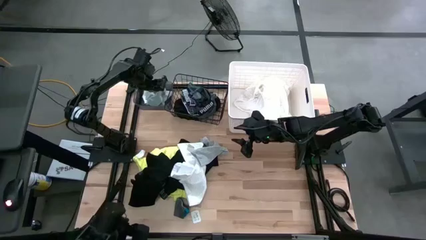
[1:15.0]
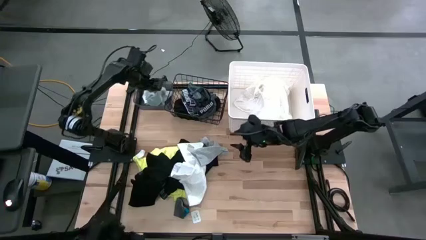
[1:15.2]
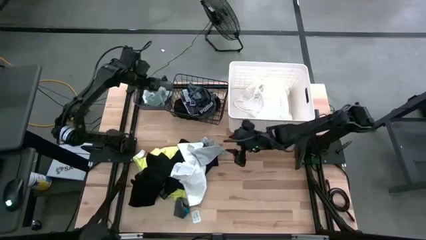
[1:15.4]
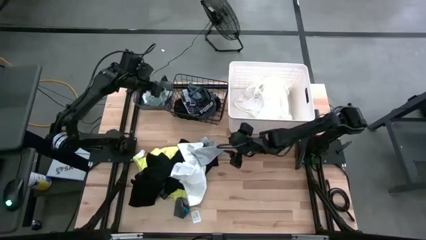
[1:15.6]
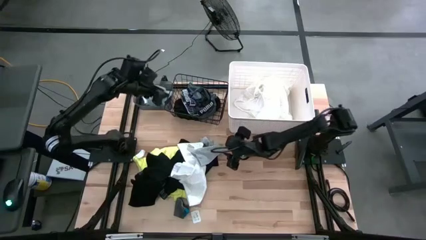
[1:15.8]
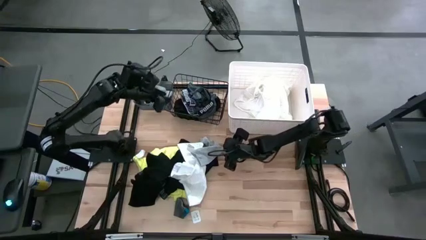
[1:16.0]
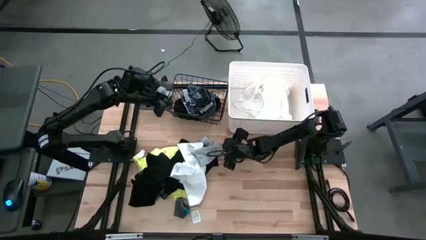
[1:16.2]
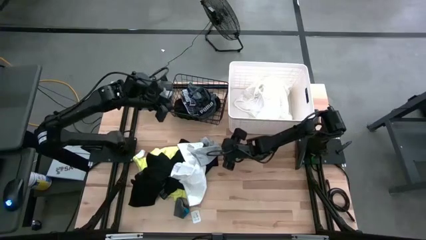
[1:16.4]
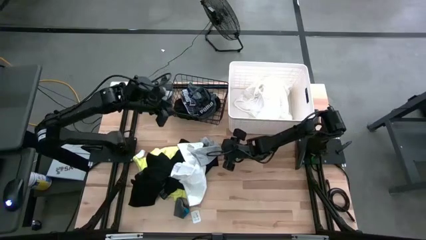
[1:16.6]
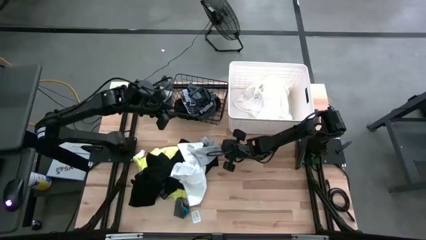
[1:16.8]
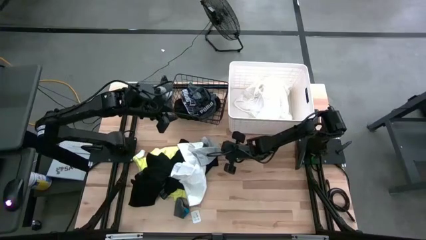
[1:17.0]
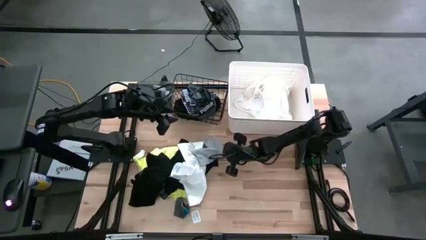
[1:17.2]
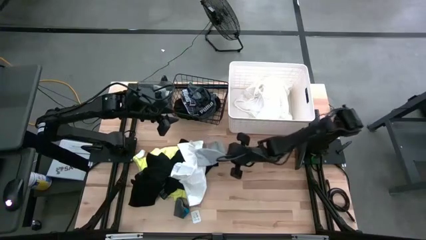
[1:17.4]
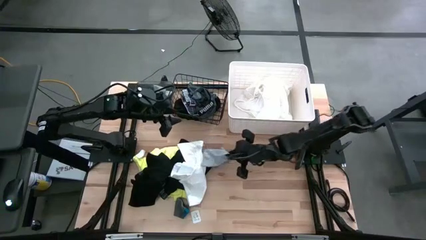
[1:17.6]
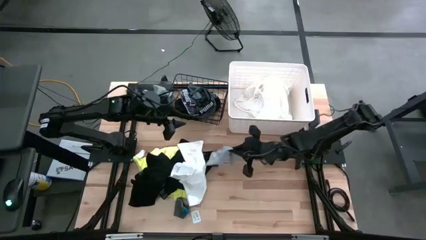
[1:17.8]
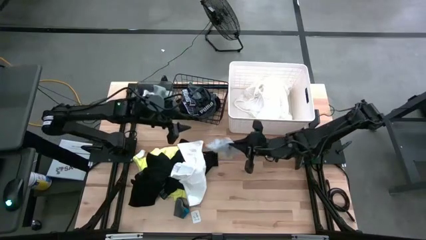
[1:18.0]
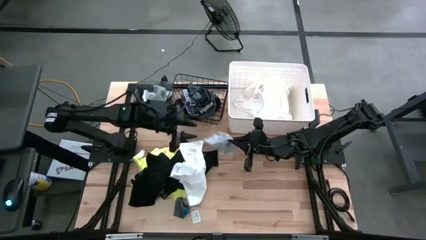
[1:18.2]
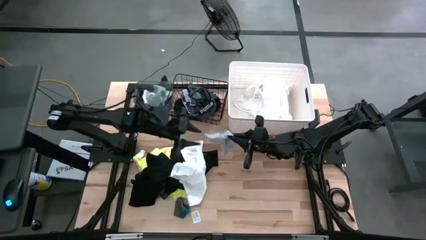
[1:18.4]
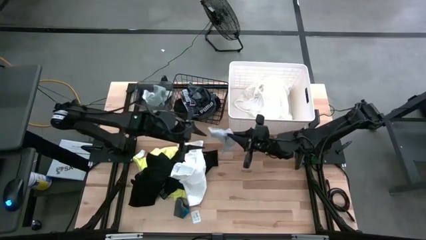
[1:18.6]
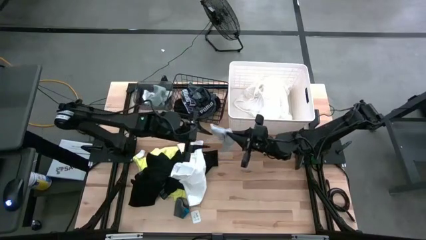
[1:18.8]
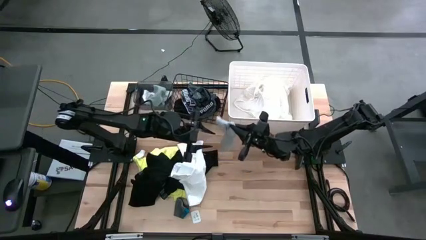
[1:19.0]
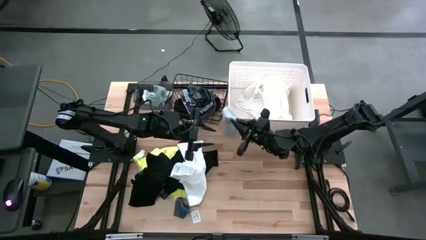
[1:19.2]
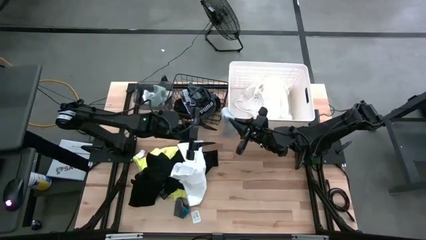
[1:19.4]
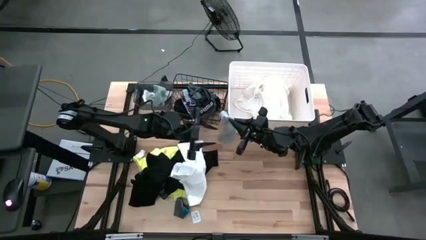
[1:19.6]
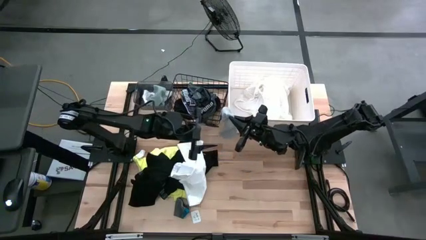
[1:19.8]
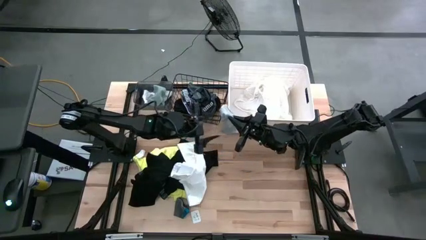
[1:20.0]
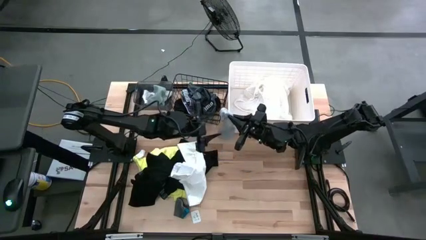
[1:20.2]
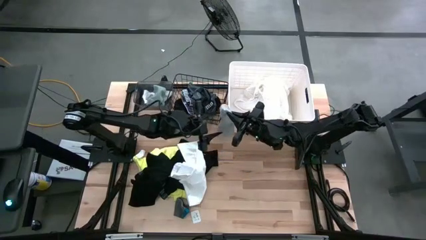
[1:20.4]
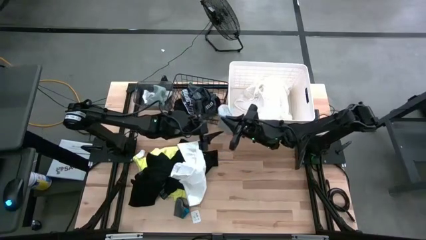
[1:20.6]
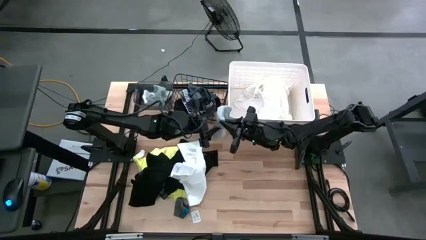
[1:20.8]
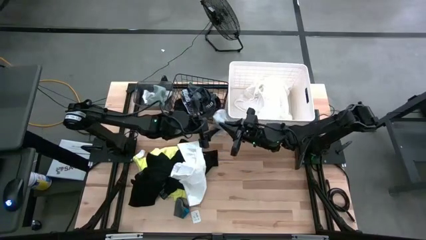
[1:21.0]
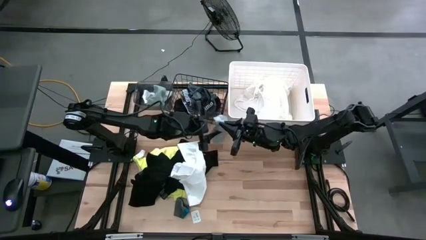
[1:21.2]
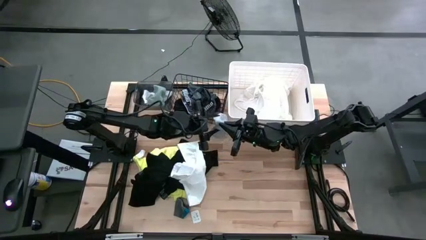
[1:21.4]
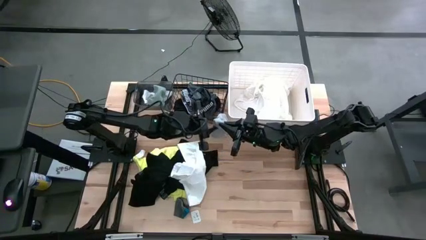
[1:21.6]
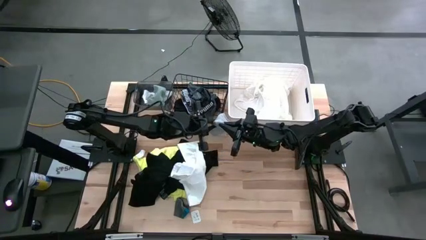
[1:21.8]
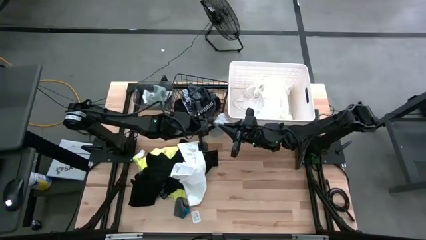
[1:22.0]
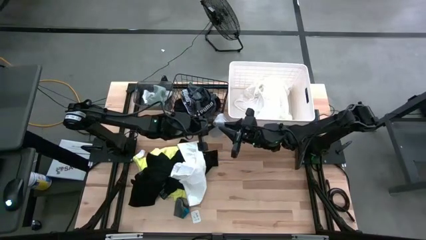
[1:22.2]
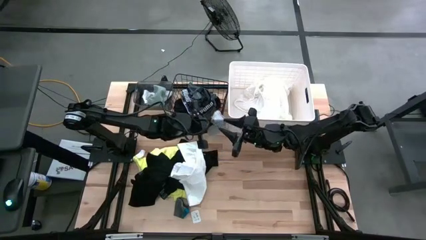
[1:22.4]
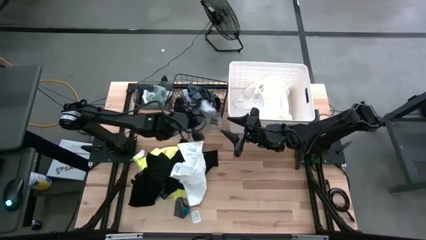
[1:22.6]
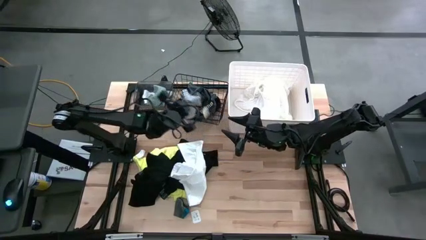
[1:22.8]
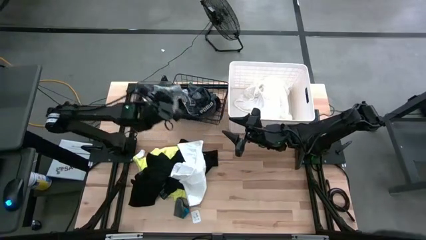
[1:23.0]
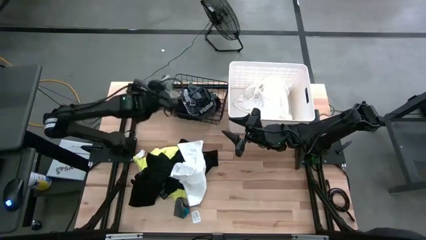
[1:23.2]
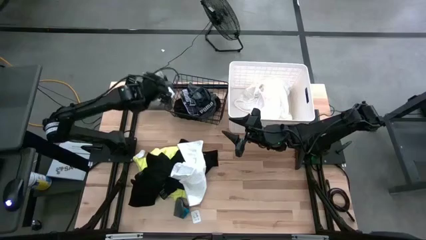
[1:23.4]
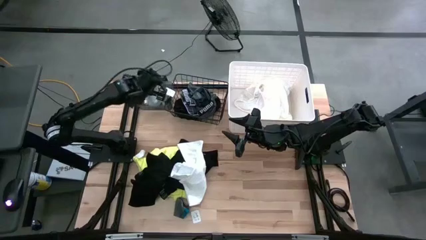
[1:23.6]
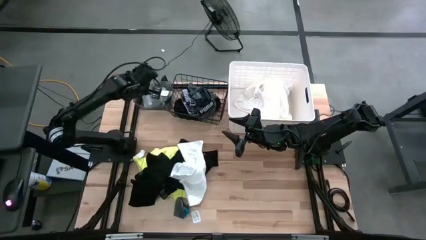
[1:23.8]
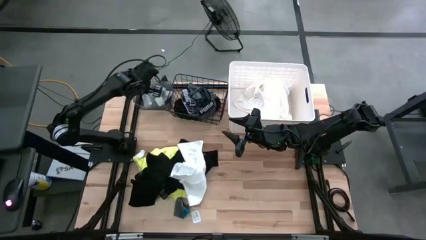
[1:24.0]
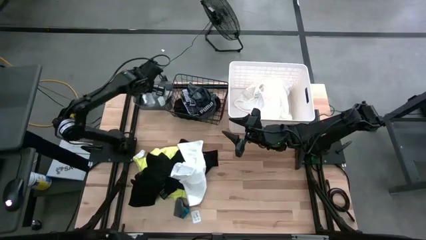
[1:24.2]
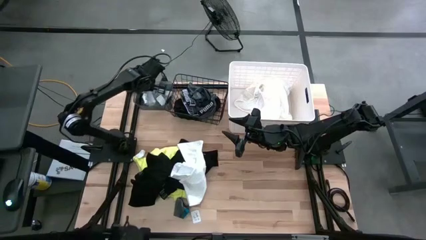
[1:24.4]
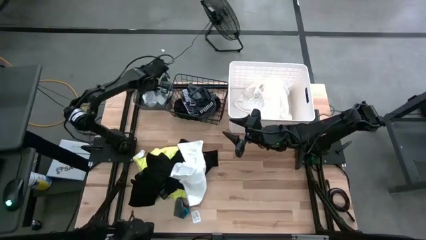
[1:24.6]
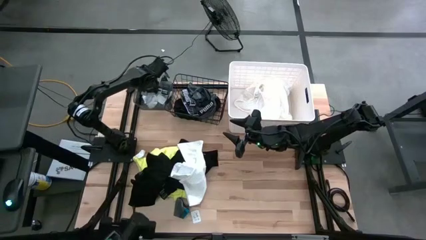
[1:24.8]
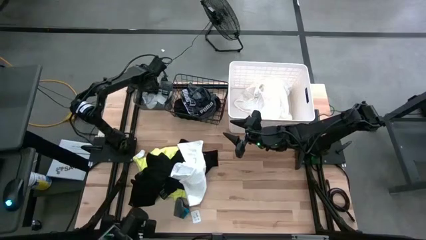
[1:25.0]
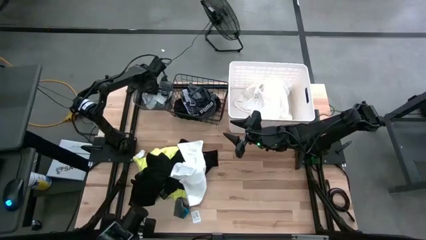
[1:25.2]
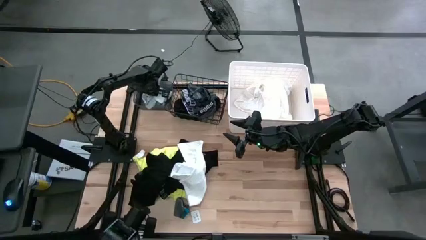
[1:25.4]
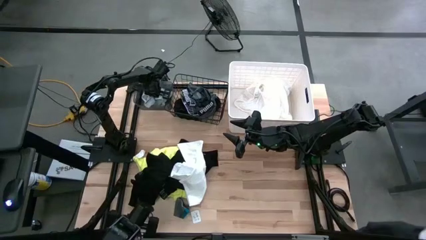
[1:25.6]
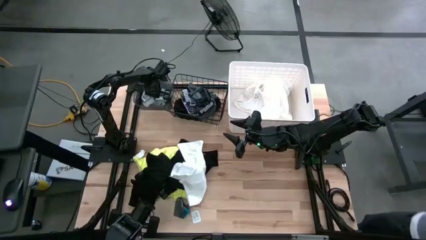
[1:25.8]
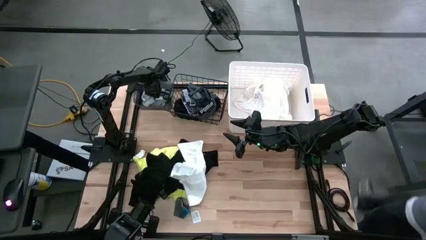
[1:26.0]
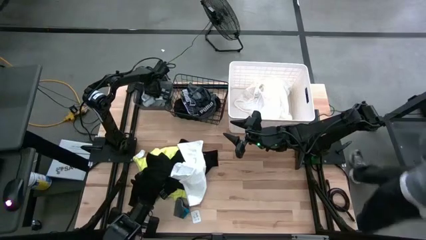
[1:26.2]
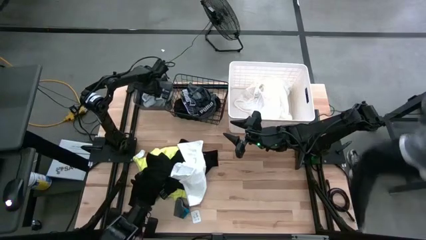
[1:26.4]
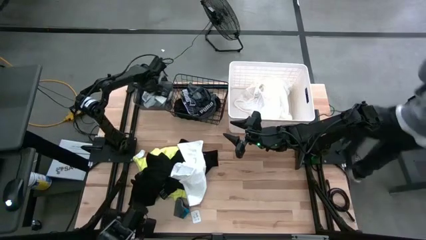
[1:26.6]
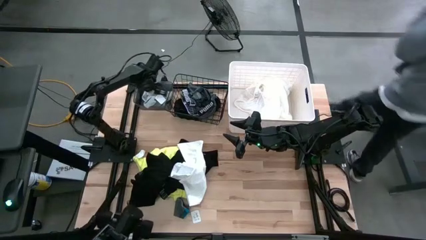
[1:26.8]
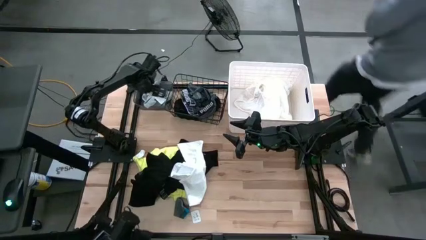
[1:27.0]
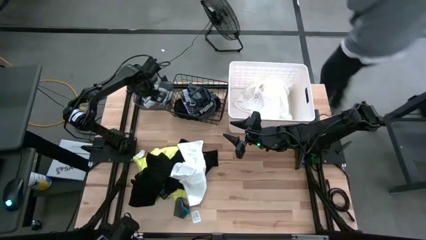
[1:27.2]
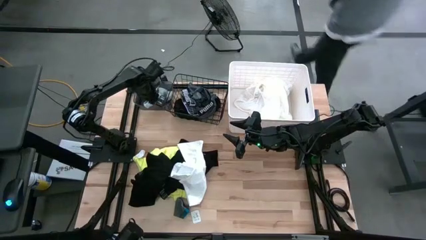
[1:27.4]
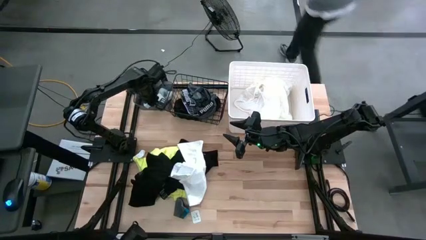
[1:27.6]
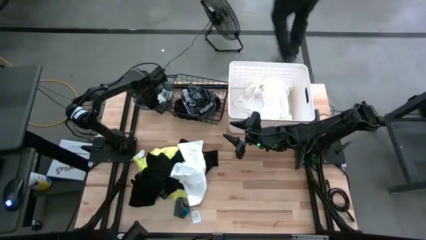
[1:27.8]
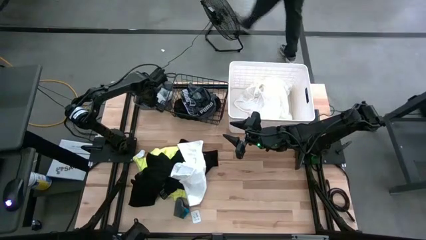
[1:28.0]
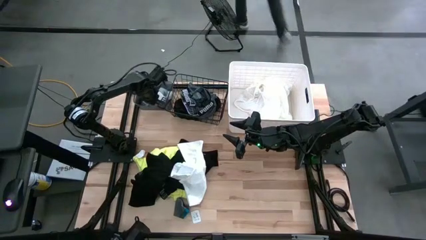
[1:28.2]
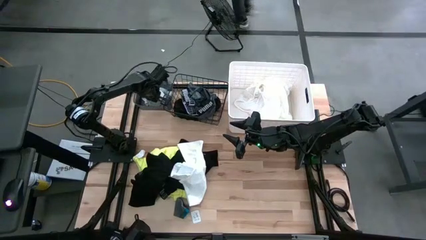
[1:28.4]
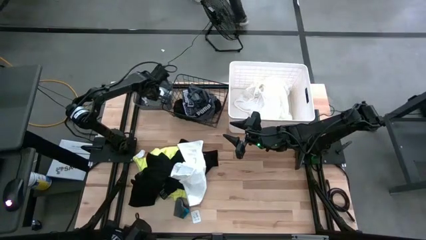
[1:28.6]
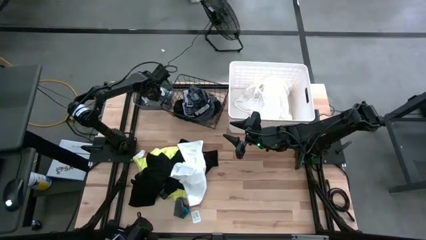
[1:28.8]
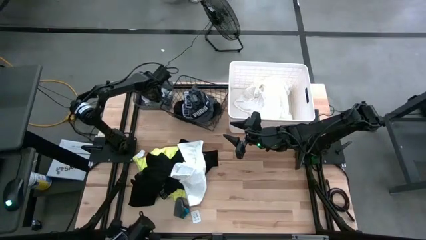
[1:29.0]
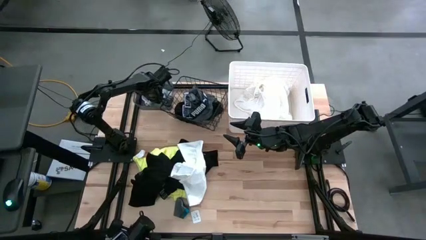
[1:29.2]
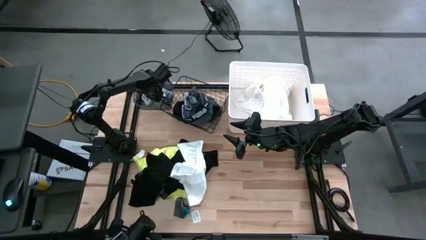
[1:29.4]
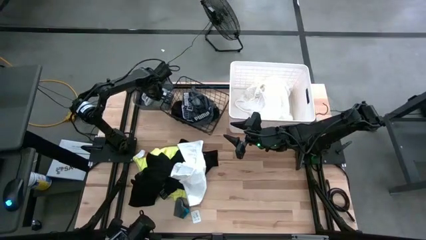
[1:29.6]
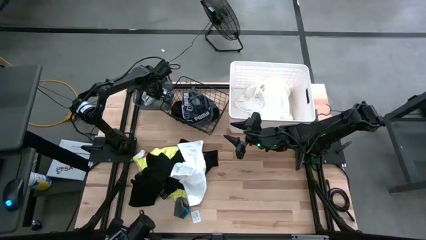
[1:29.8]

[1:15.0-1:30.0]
Task: Pick & Place Cloths
Put the gray sock into the black bin

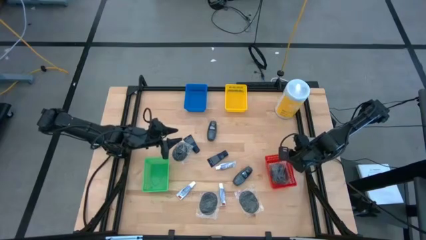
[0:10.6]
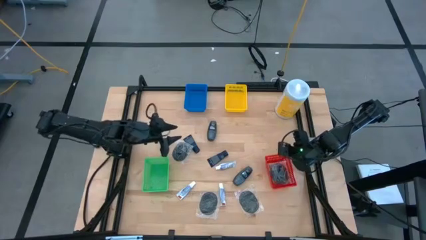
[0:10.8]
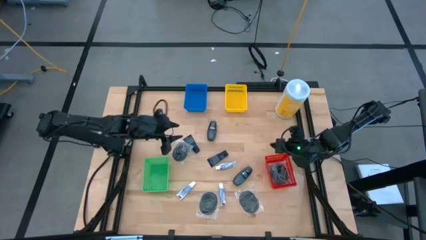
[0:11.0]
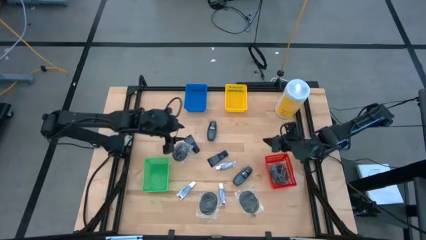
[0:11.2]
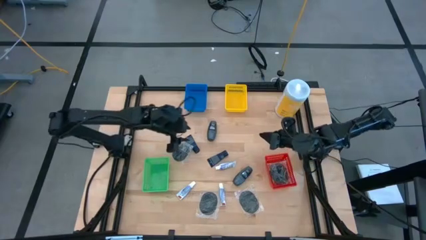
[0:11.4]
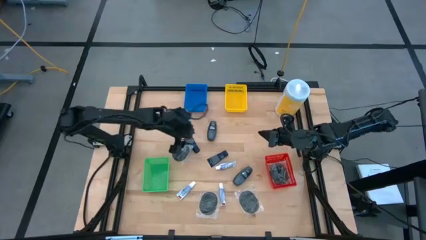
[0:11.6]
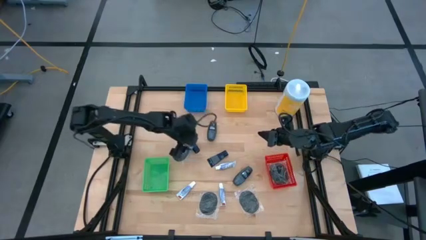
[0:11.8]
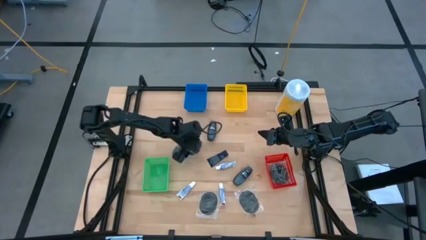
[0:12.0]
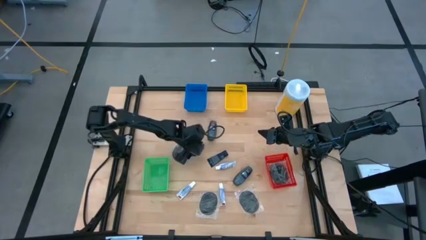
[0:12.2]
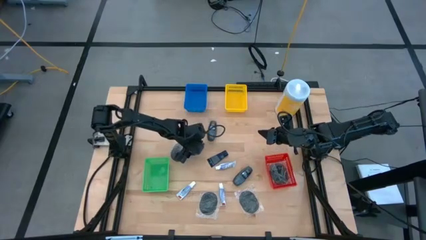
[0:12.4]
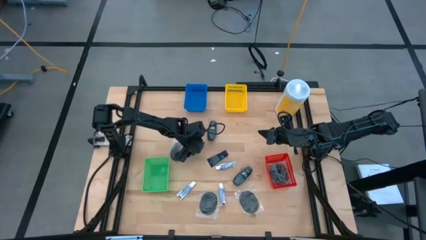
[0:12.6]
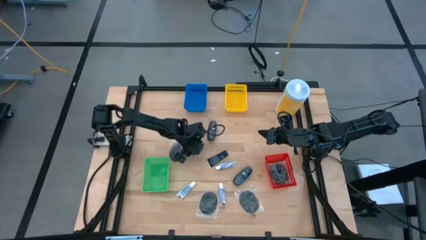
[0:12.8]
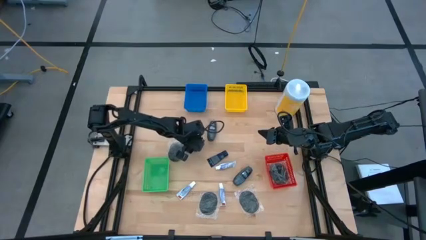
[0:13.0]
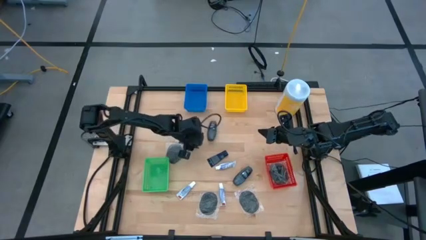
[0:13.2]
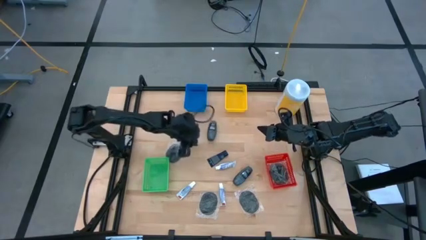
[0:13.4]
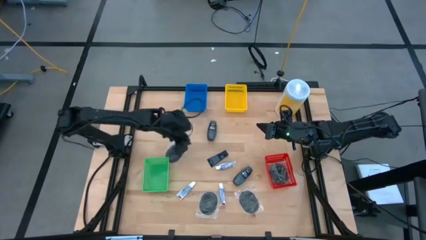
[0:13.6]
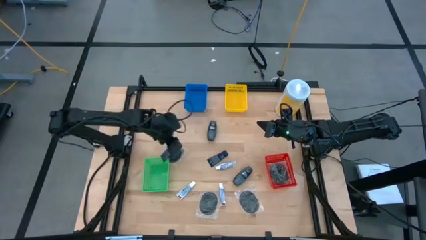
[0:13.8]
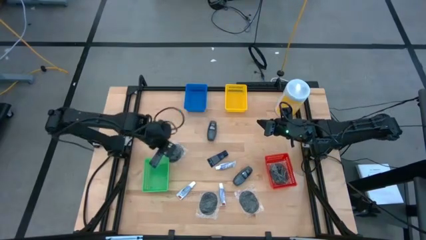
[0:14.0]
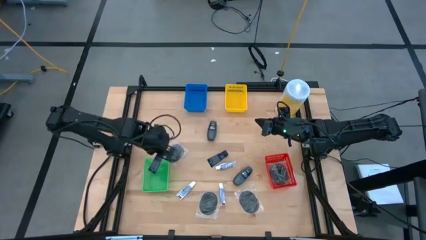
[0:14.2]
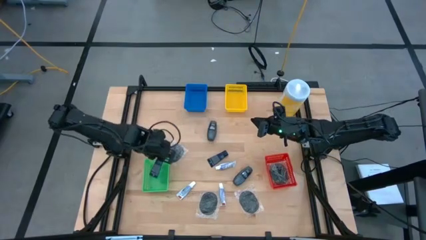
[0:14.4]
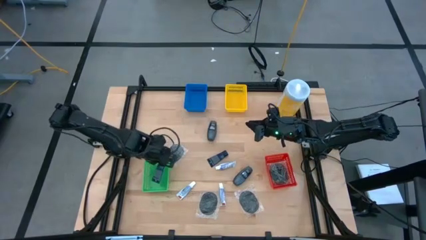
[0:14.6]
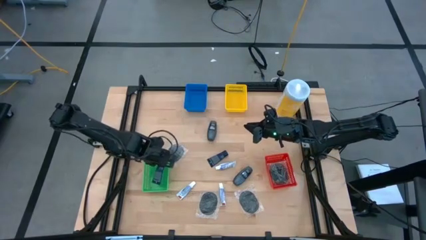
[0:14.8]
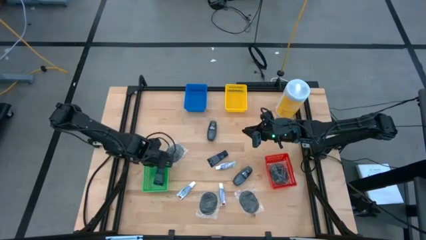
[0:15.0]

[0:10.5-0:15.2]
Task: Pick & Place Travel size toiletries
Put the blue shaving cream into the green basket
